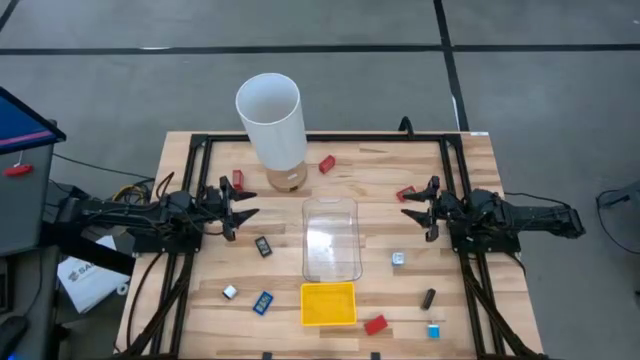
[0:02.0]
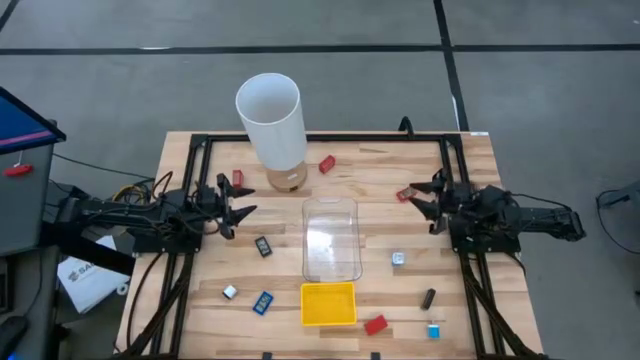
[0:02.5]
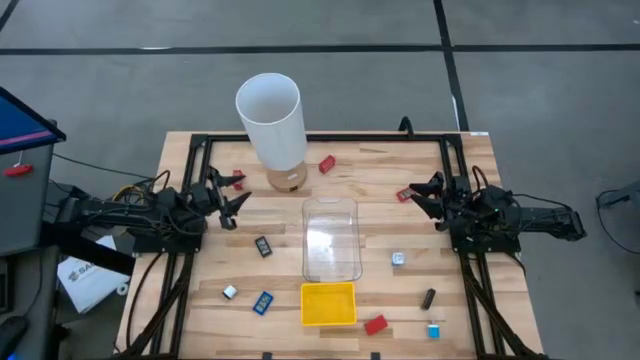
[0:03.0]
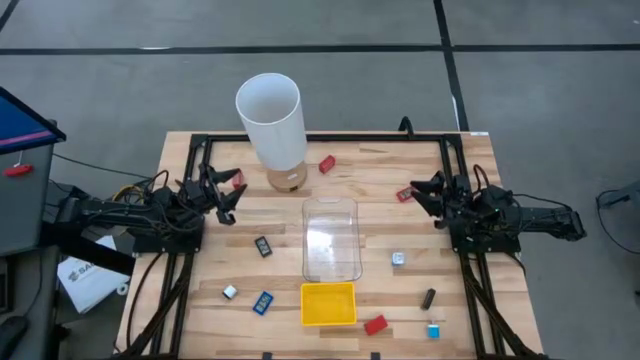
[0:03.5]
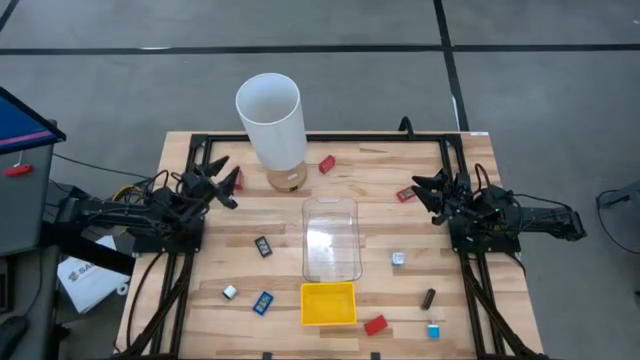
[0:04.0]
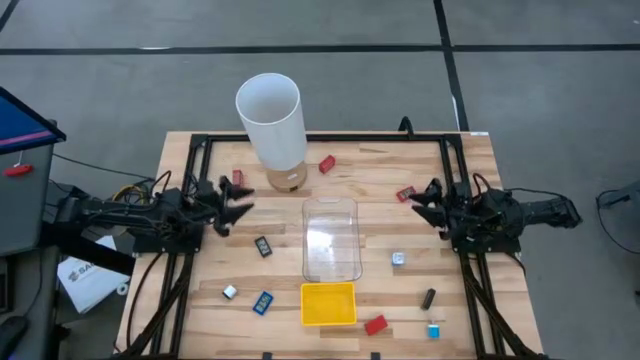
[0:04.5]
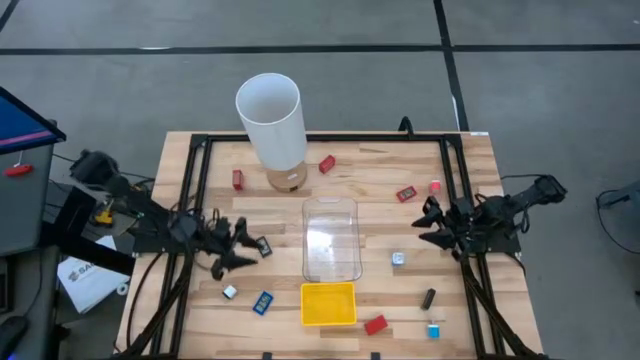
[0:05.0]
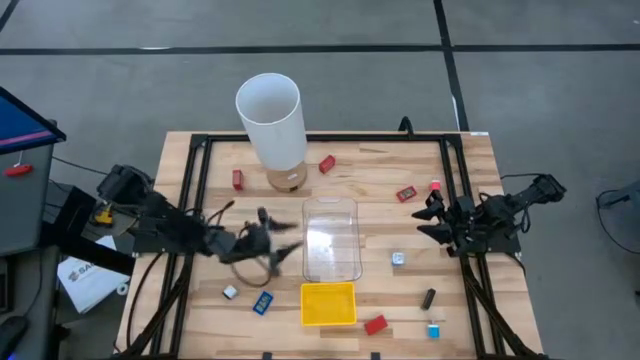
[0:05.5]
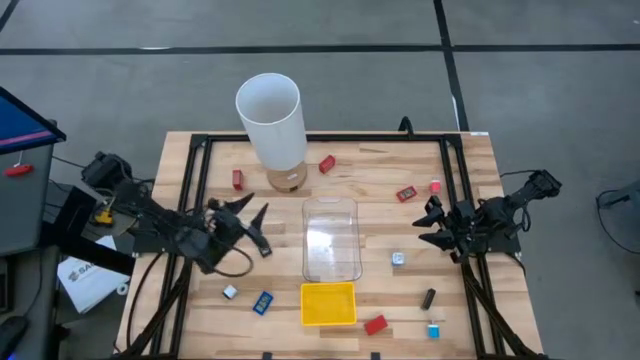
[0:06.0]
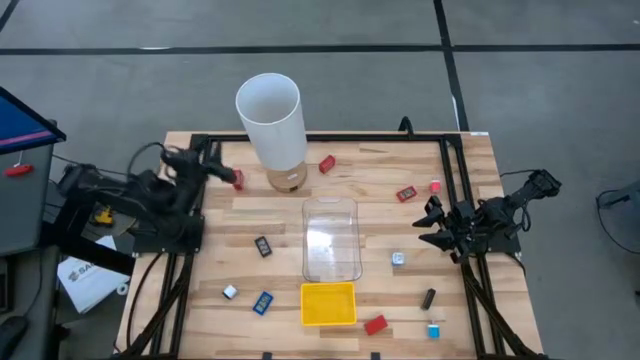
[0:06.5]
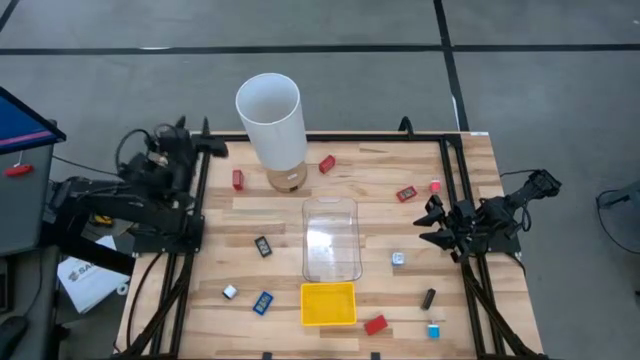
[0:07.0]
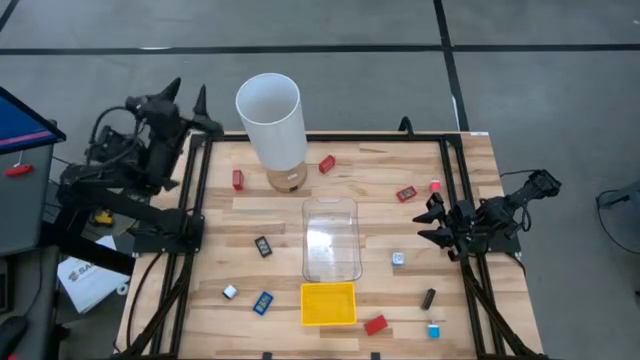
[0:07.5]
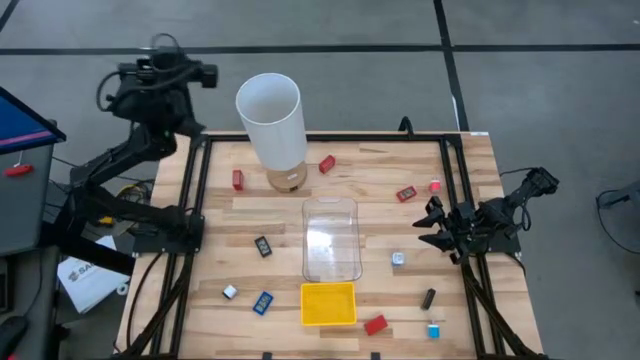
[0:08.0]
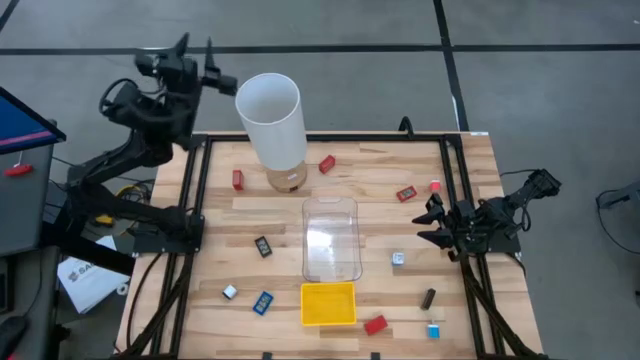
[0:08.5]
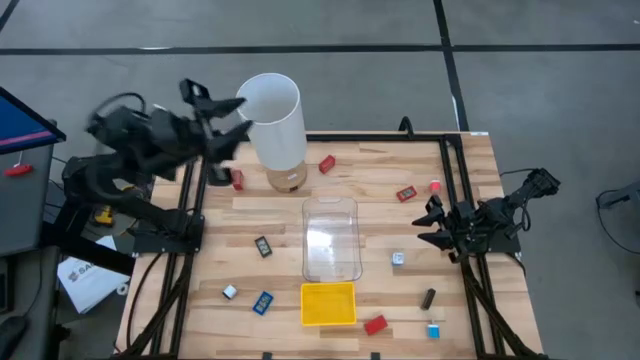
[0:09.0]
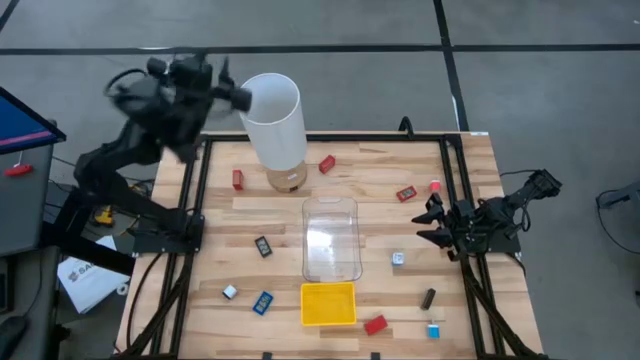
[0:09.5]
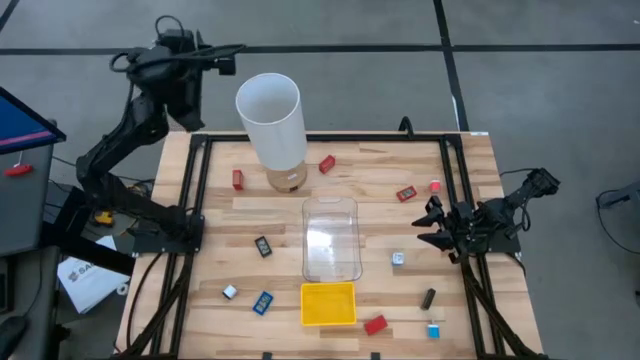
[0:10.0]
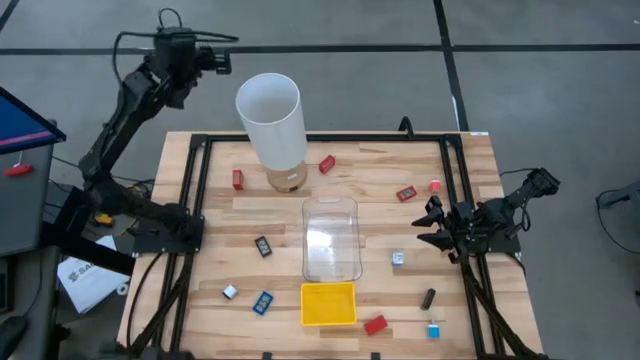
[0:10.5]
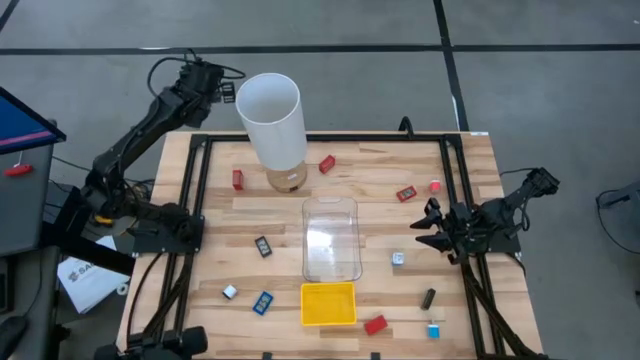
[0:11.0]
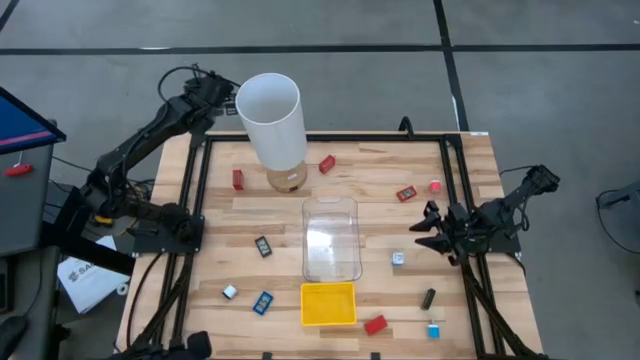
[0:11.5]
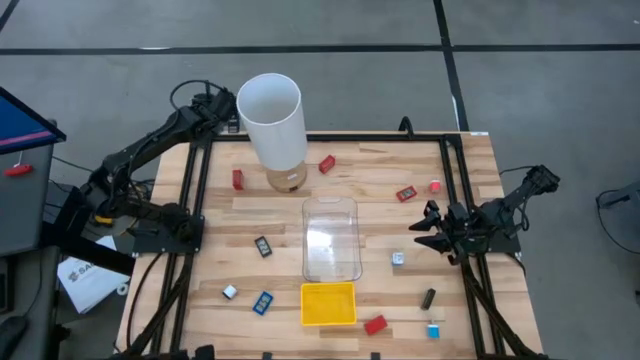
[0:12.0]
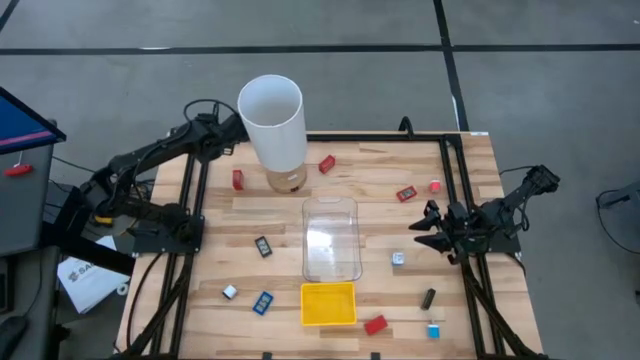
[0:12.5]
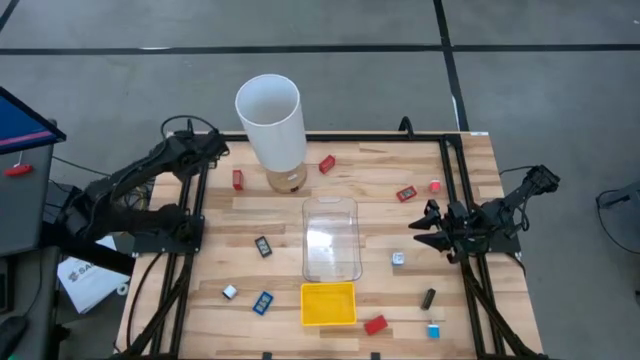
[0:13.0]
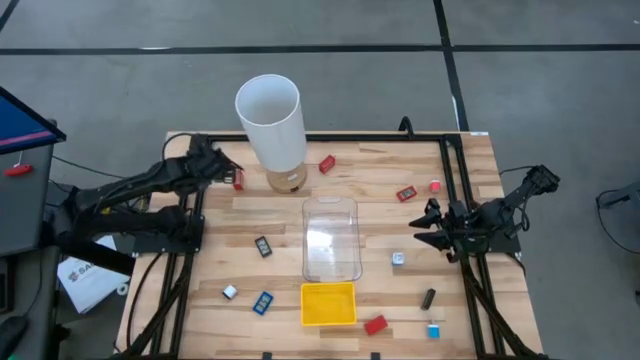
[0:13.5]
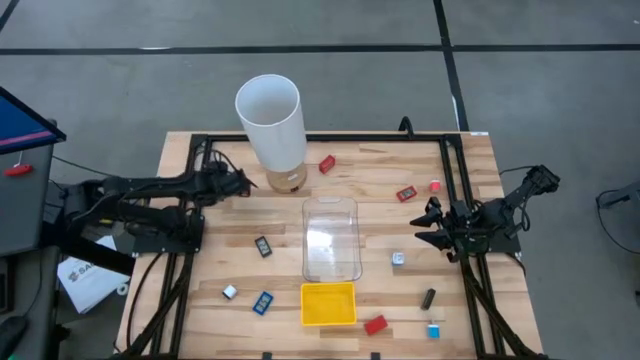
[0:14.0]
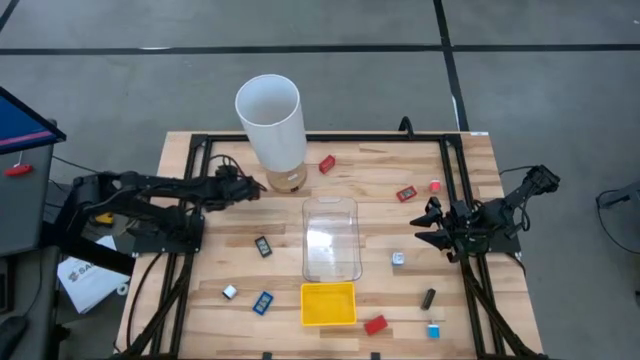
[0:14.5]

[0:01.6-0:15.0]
Task: Pick & Place Office items
Put the bottom red charger adapter into the transparent bin
